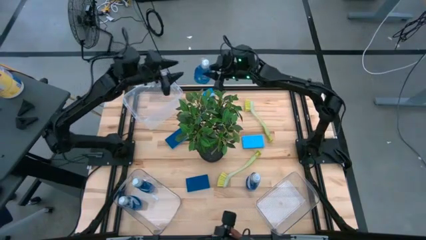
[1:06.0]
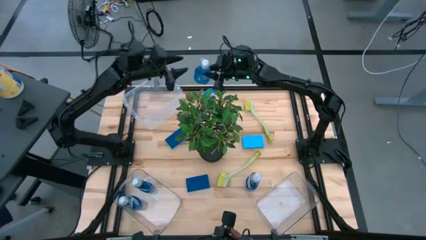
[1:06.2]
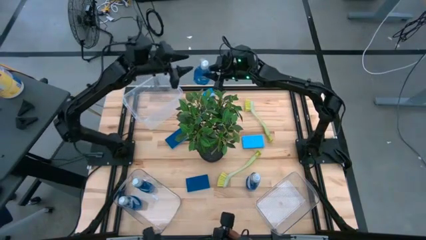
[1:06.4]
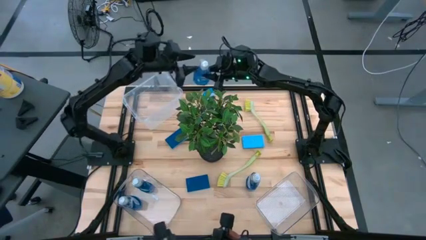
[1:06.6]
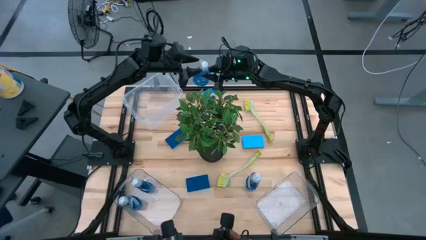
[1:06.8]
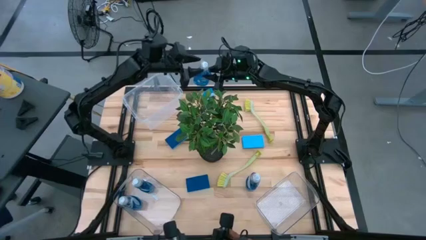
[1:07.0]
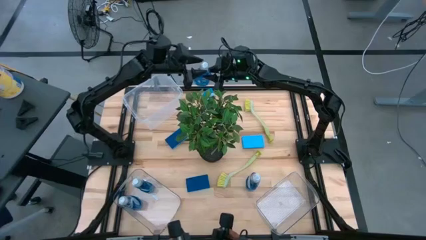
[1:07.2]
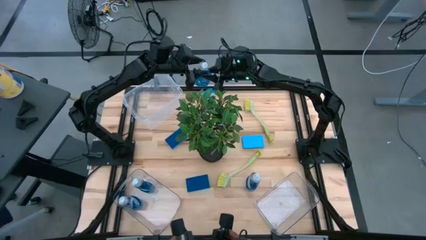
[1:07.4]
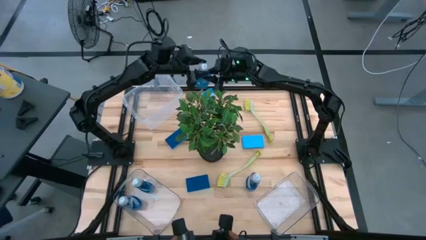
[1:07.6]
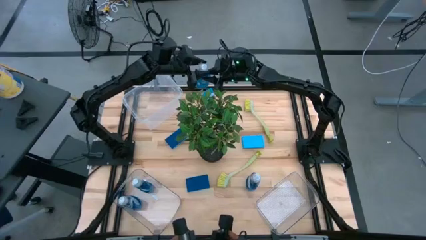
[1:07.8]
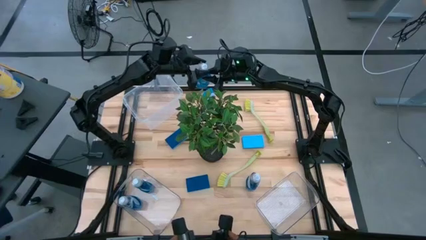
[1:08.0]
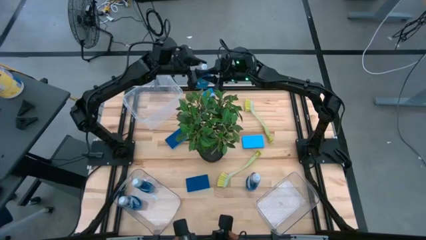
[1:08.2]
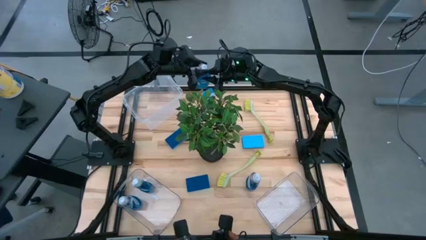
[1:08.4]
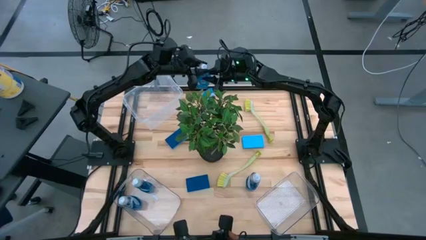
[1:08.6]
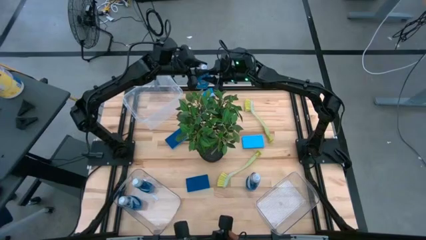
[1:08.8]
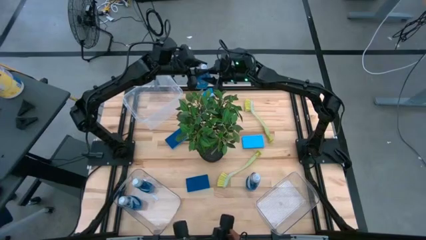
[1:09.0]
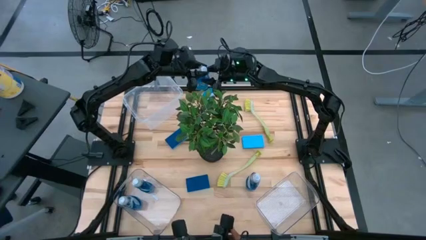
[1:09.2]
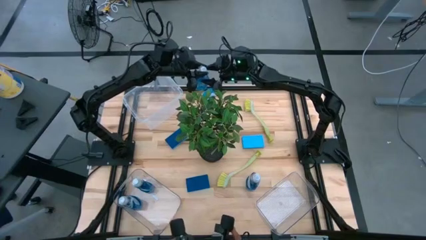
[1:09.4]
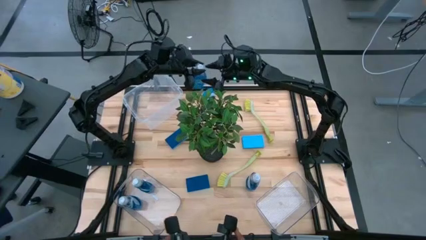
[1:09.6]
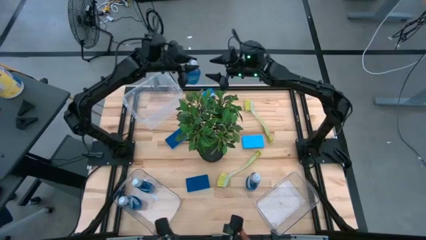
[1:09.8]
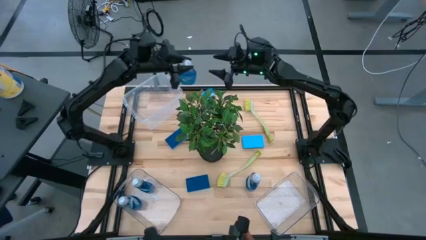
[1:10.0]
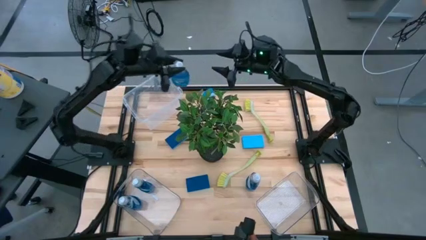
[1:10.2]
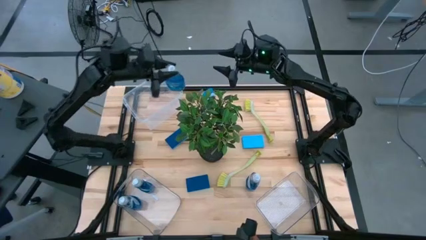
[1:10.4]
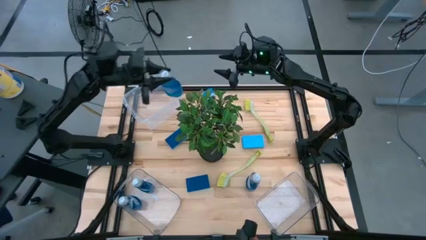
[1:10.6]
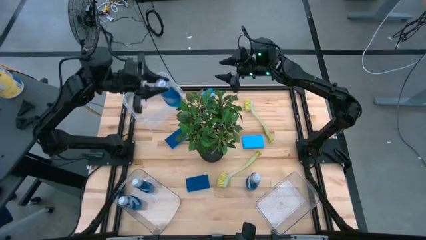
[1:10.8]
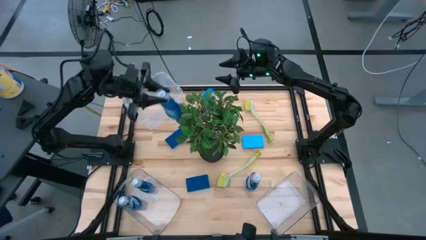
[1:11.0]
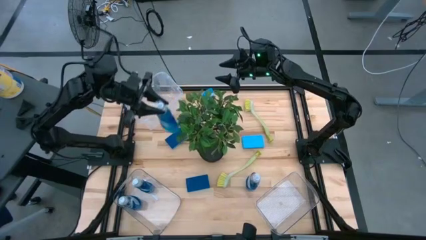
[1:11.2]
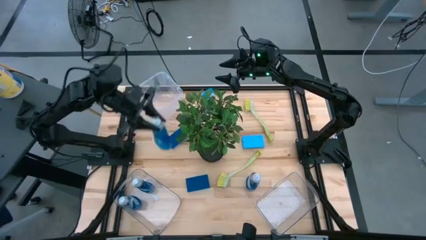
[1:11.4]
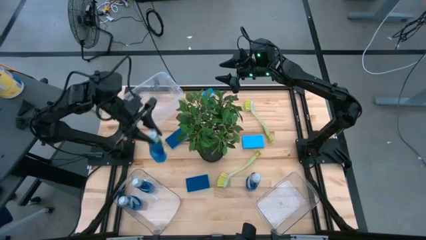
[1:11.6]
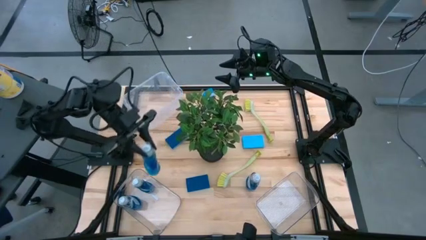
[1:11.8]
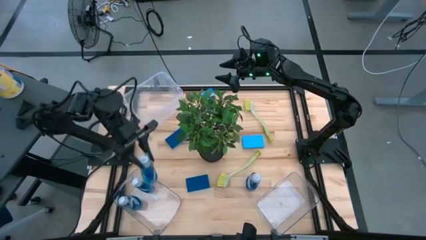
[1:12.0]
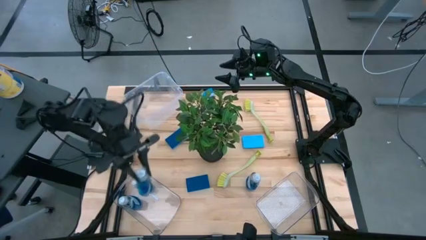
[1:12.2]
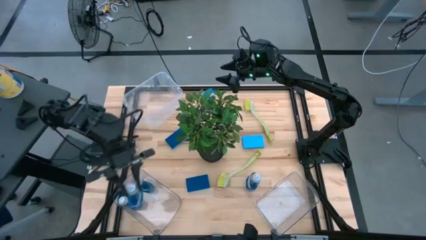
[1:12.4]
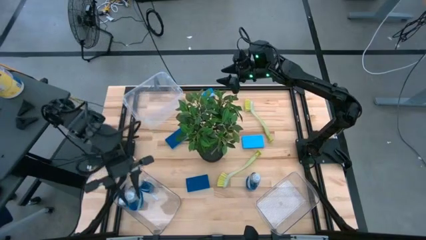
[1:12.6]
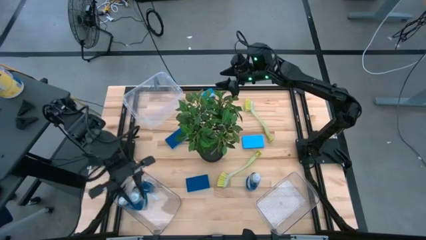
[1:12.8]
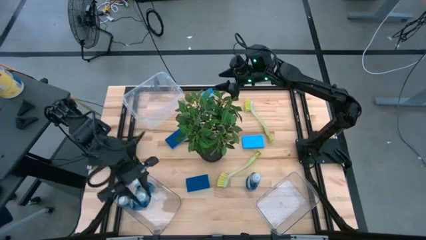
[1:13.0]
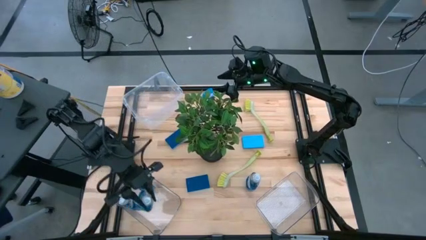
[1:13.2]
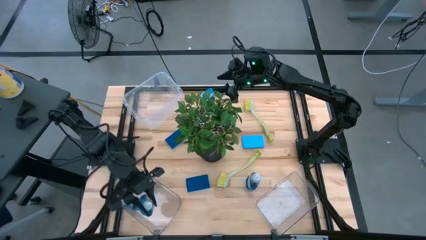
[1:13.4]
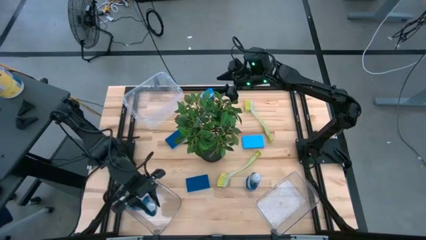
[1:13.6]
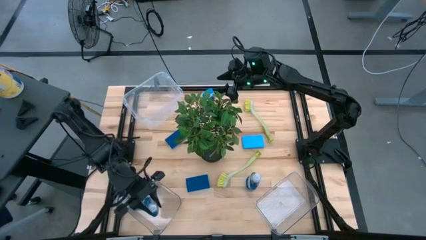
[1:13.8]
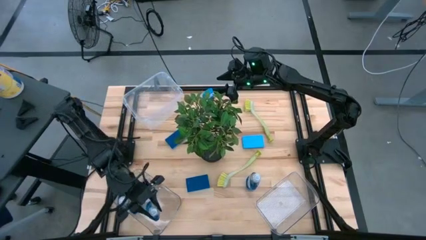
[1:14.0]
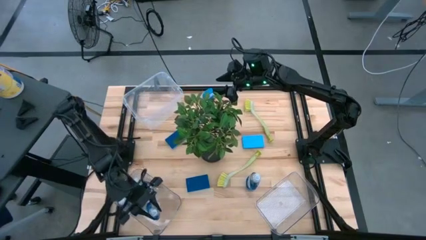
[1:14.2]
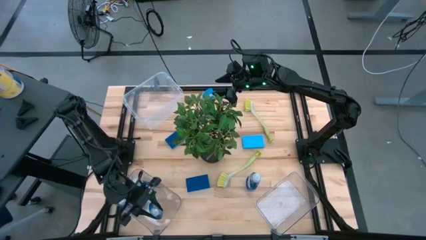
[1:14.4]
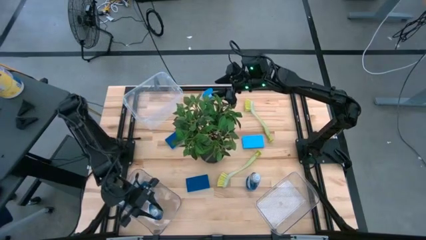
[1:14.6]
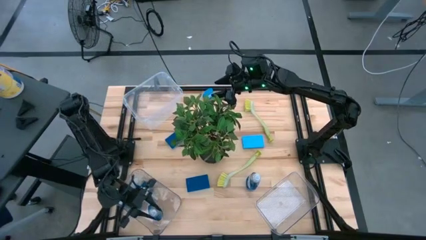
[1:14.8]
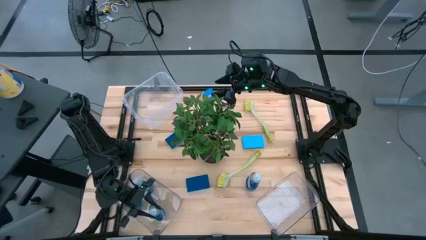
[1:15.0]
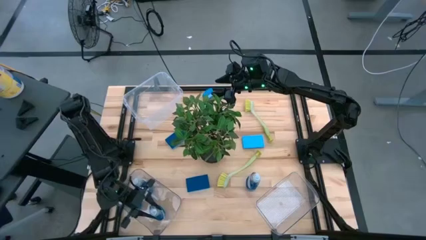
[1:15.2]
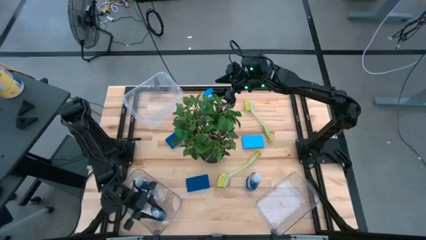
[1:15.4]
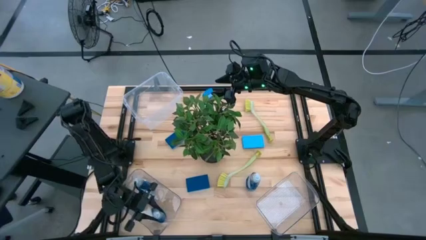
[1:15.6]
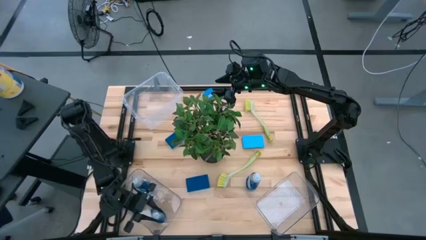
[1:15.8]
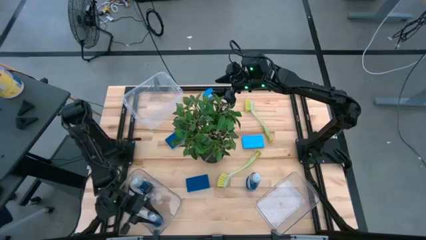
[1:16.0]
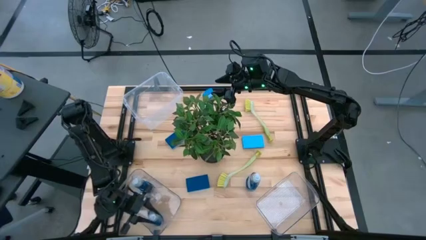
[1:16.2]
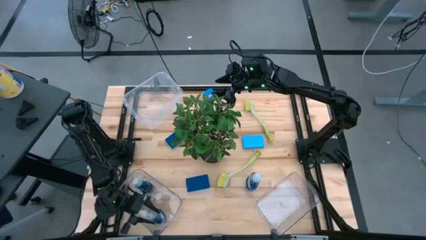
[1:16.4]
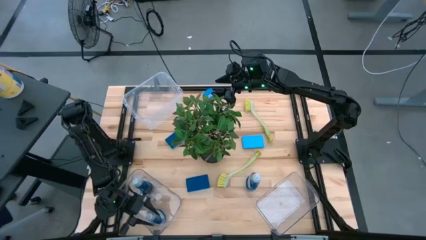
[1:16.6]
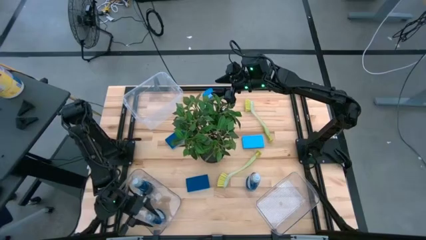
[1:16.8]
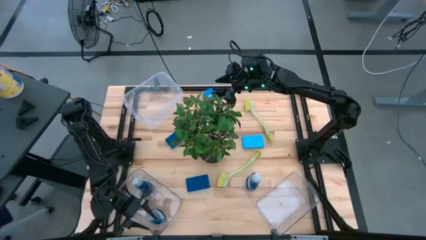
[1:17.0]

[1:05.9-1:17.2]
Task: Pick & Place Kitchen Sink Supplies
Put the blue liquid soap bottle into the bottom left transparent bin

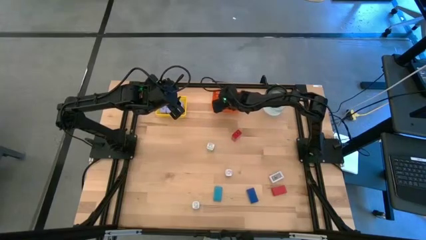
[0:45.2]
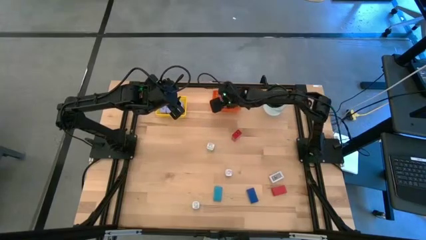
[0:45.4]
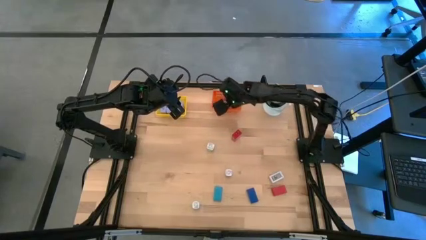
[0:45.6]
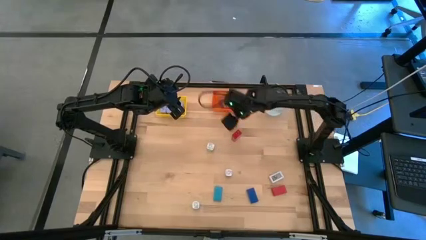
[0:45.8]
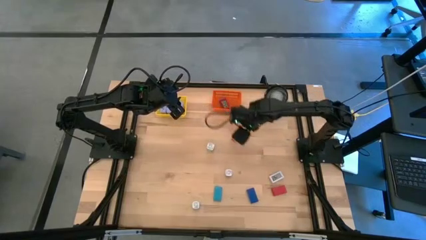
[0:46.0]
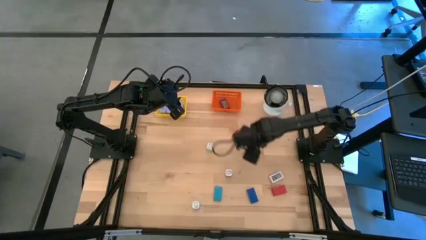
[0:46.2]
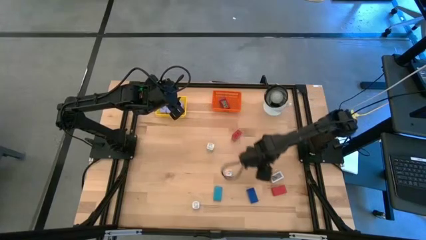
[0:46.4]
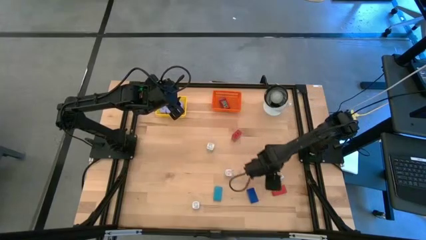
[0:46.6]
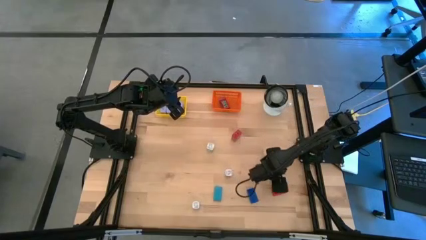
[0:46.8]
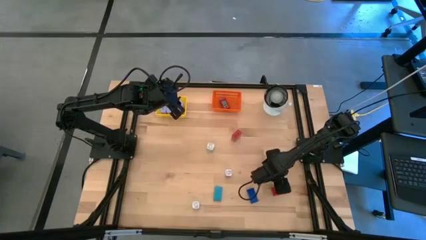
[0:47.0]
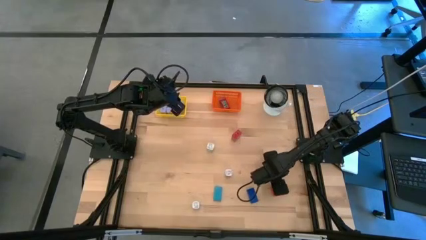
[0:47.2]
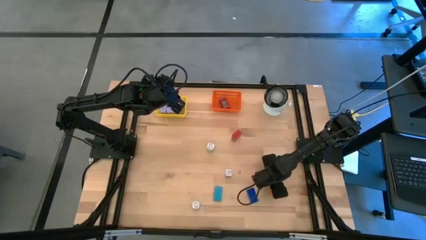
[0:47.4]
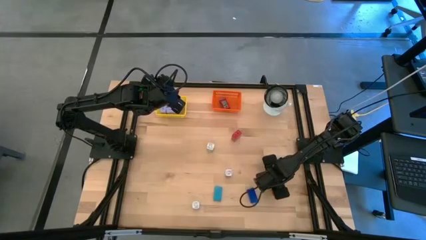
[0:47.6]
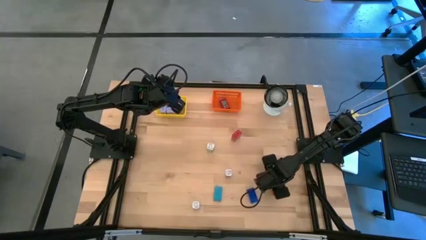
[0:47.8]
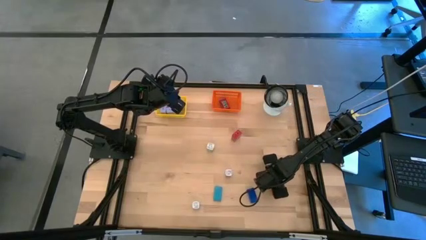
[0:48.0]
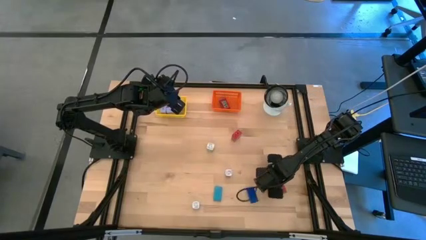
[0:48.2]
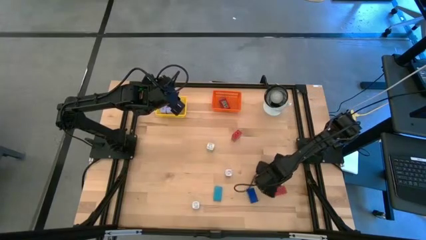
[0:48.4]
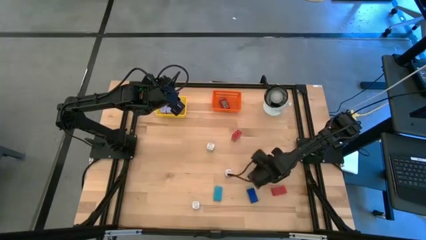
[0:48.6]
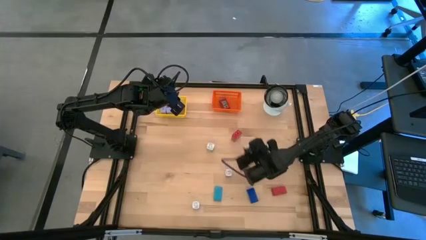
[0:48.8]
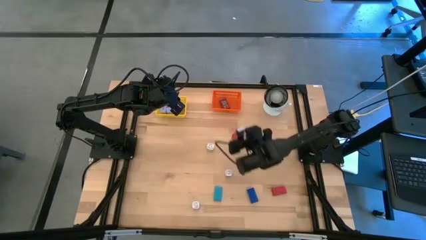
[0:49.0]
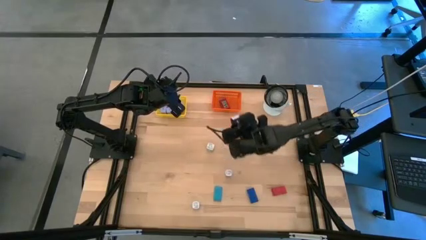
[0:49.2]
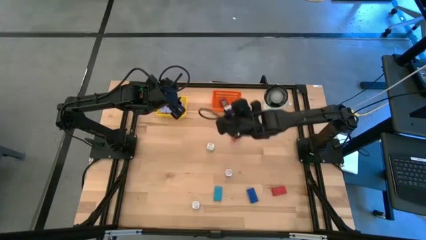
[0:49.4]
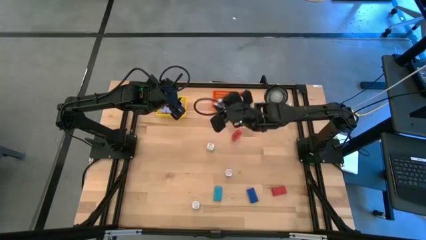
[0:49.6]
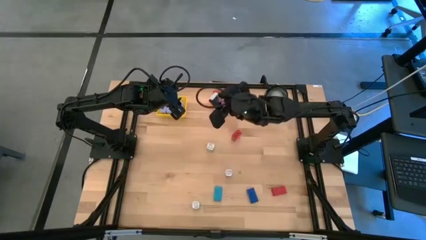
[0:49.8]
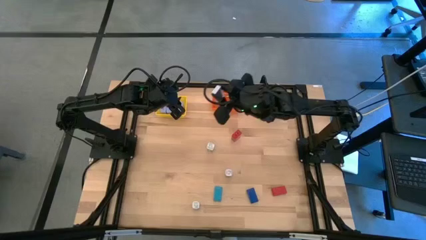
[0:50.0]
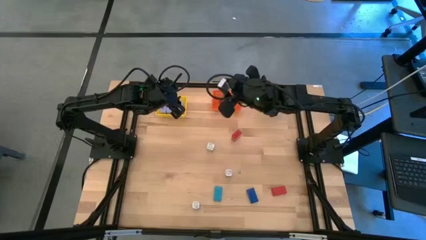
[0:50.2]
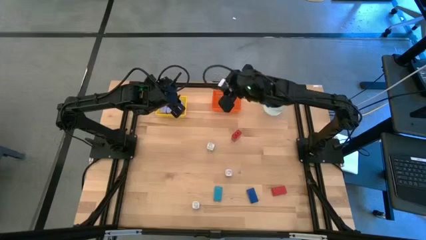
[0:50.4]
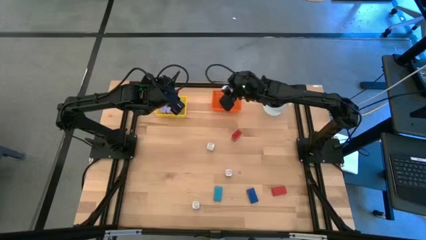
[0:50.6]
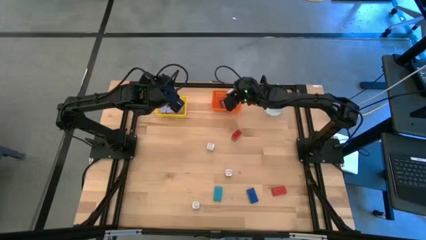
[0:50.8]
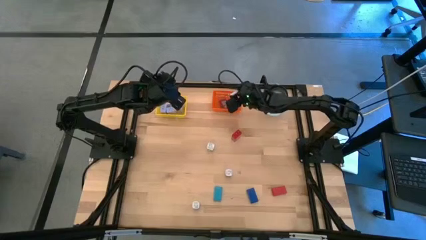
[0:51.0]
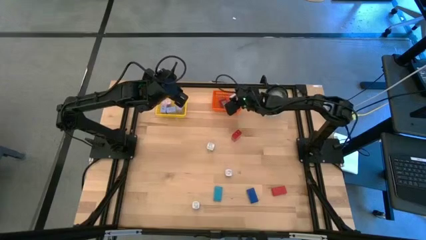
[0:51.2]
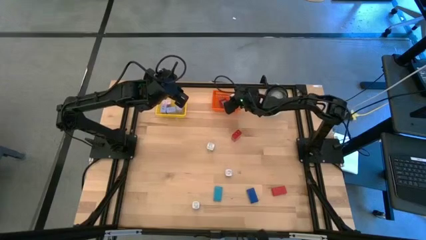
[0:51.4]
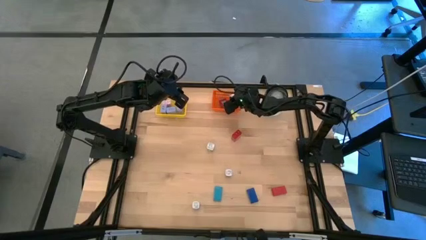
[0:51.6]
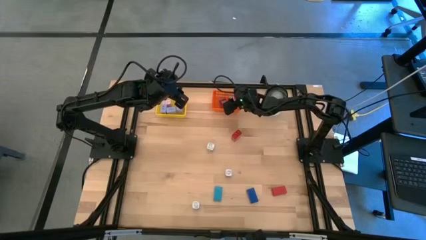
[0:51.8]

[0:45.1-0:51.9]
Task: Pick & Place Office items
Put the white digital timer into the orange bin
